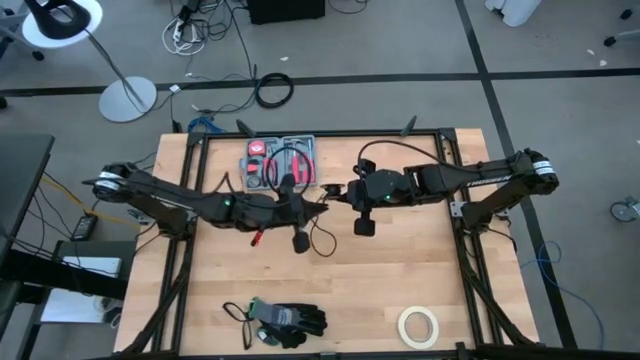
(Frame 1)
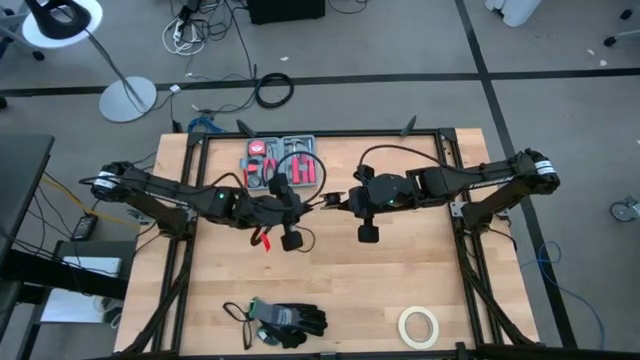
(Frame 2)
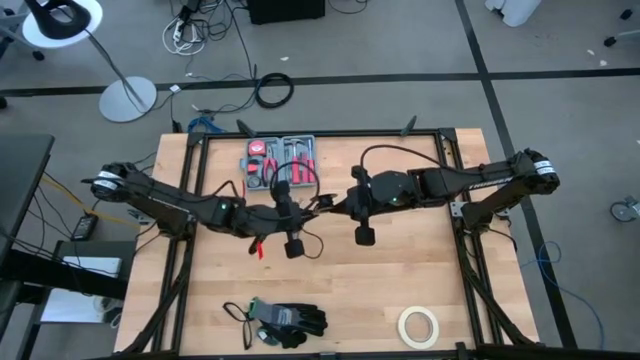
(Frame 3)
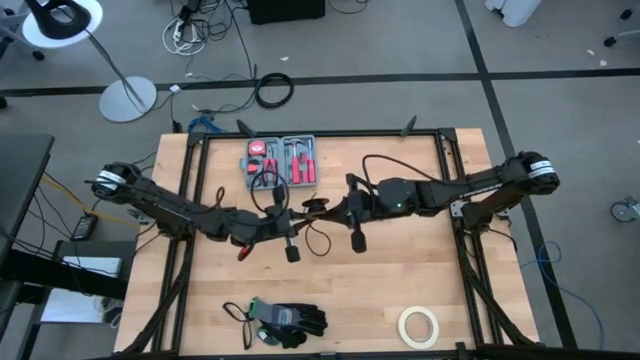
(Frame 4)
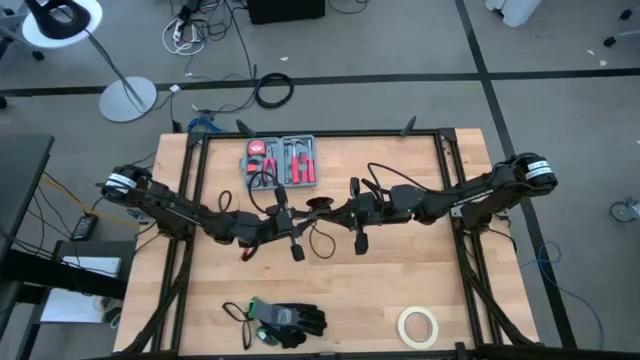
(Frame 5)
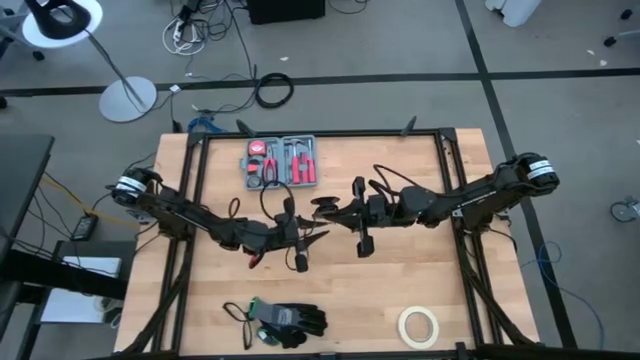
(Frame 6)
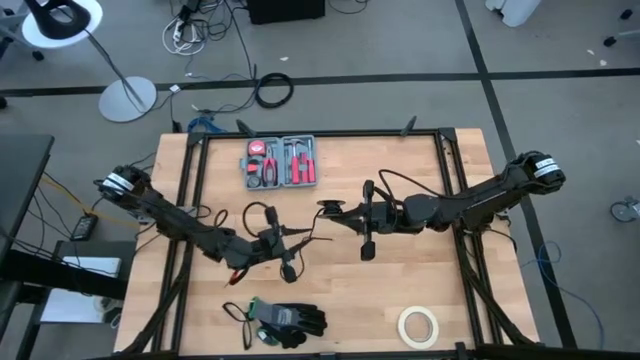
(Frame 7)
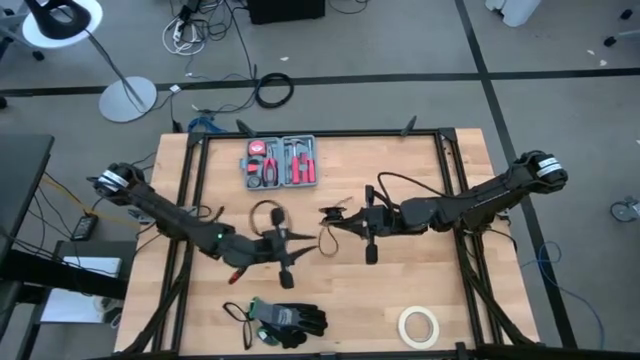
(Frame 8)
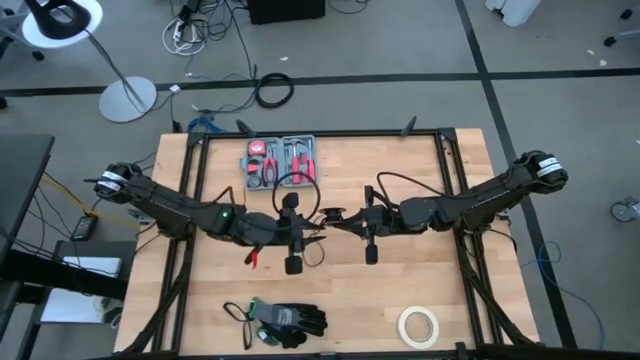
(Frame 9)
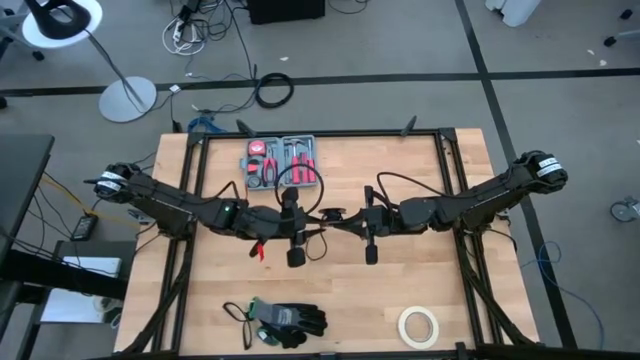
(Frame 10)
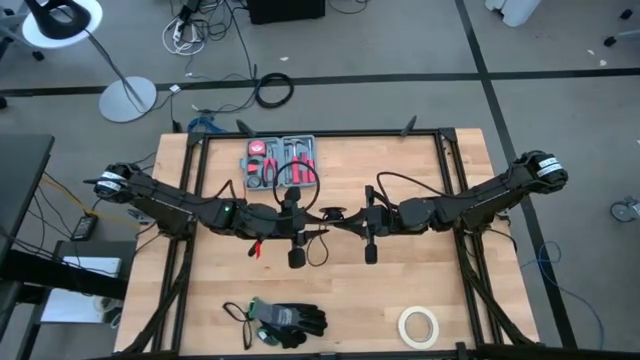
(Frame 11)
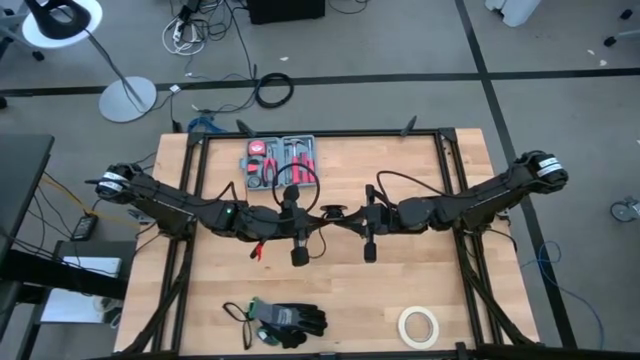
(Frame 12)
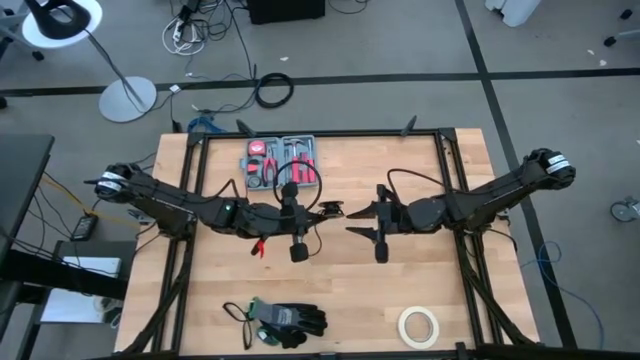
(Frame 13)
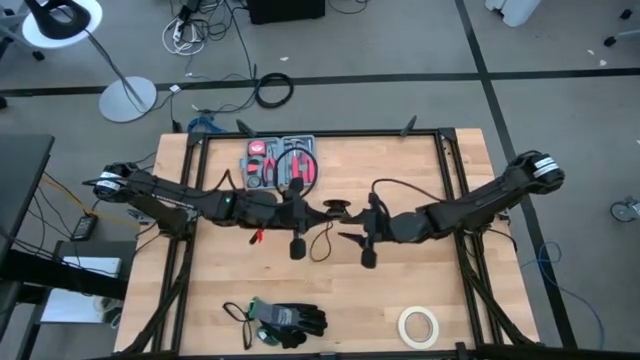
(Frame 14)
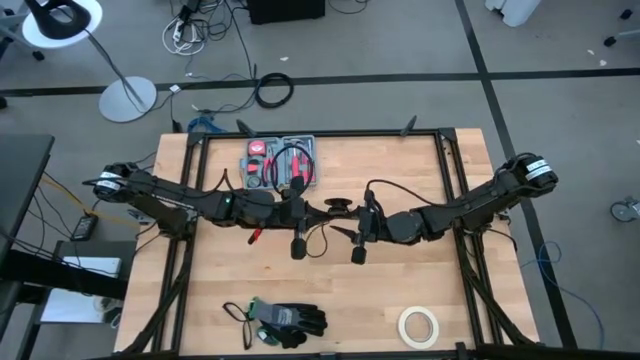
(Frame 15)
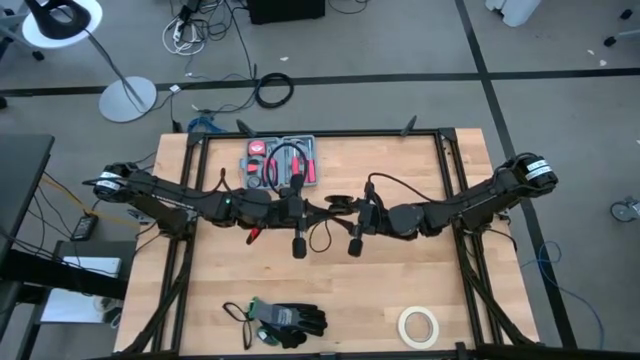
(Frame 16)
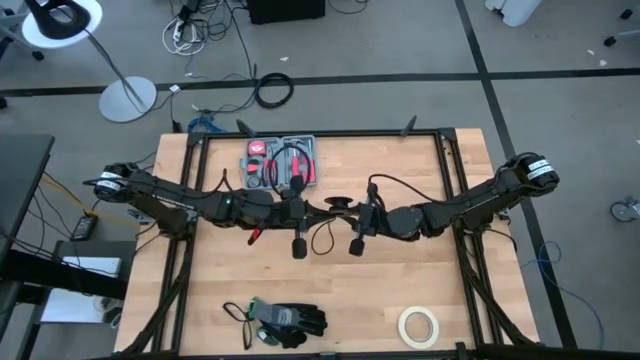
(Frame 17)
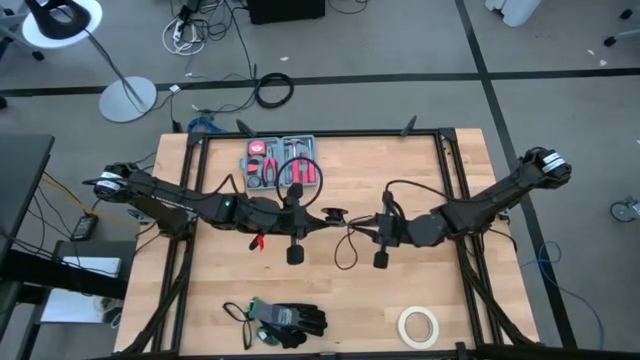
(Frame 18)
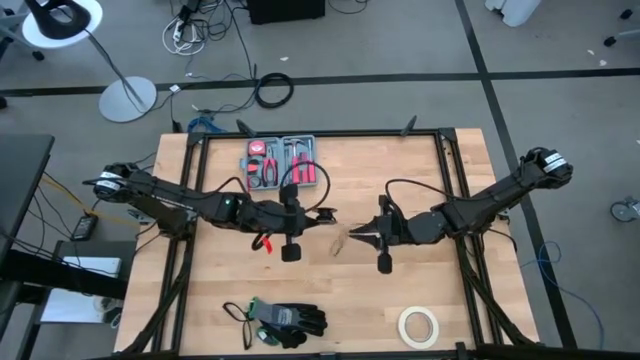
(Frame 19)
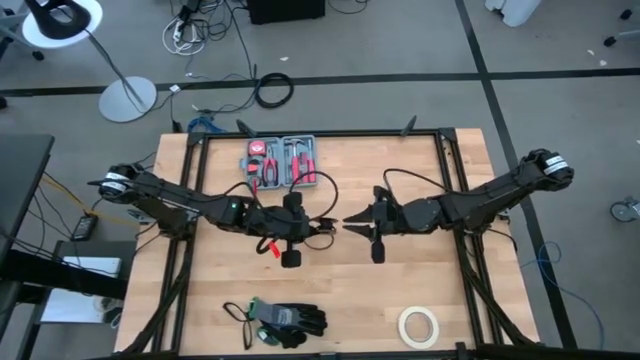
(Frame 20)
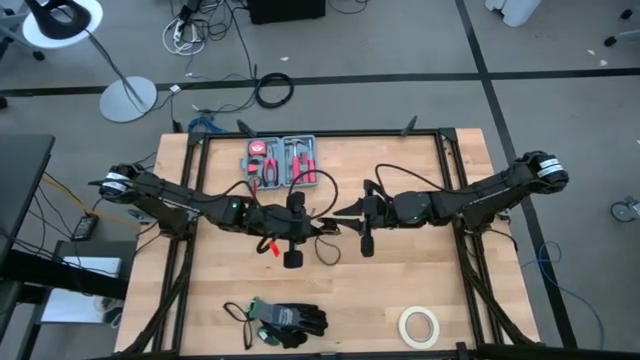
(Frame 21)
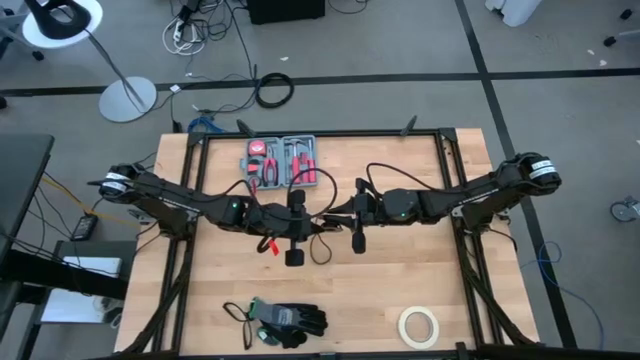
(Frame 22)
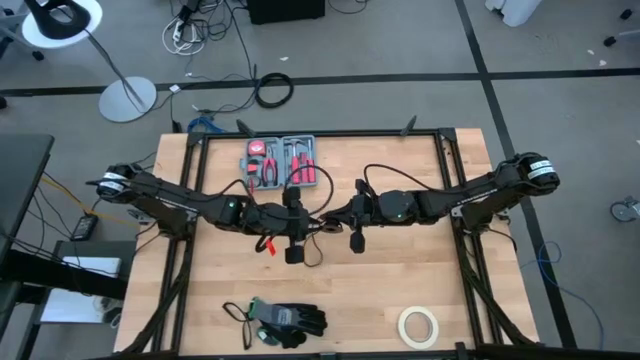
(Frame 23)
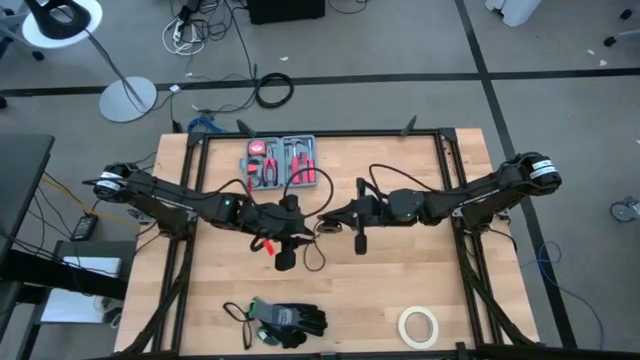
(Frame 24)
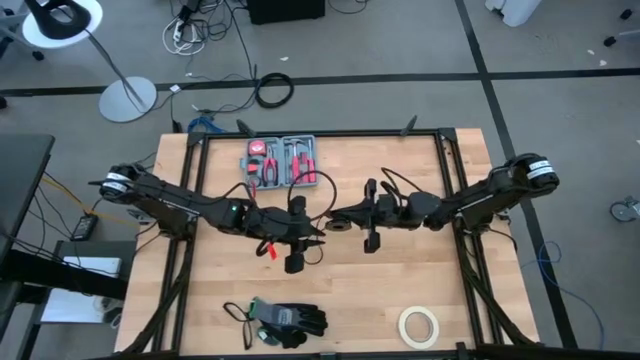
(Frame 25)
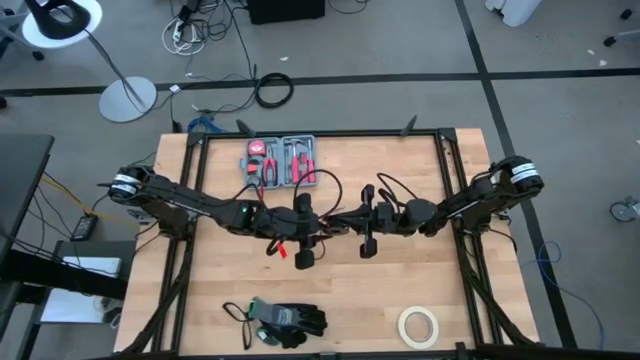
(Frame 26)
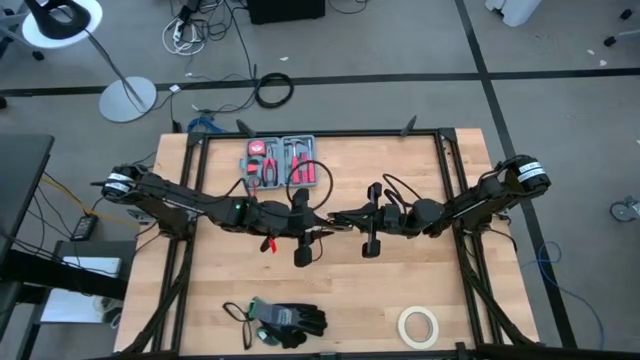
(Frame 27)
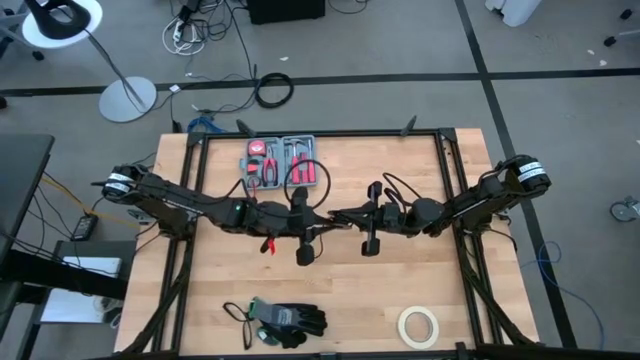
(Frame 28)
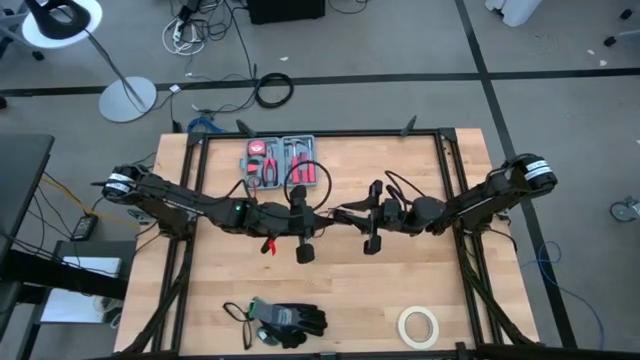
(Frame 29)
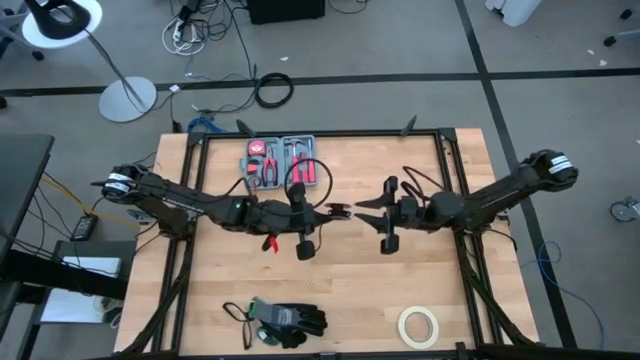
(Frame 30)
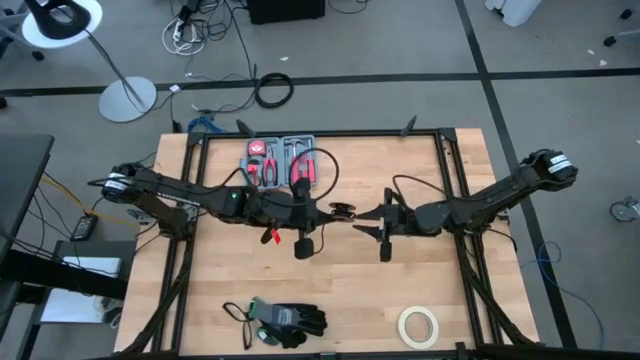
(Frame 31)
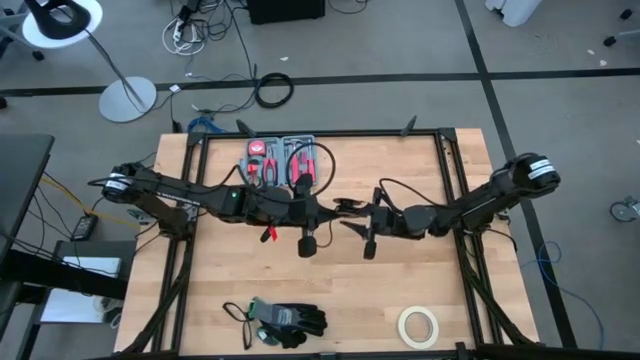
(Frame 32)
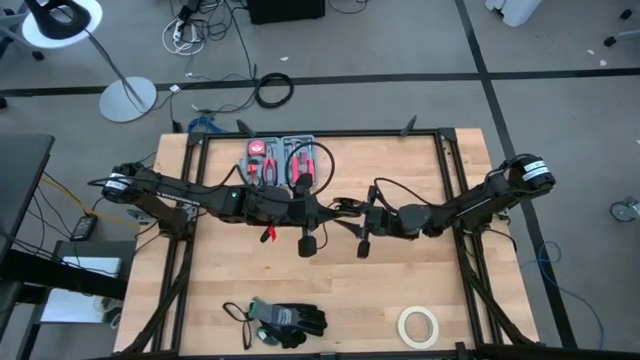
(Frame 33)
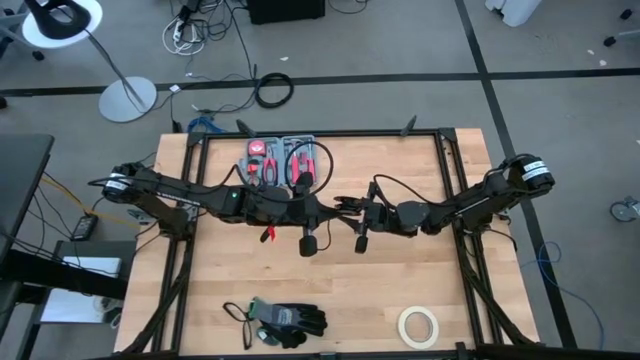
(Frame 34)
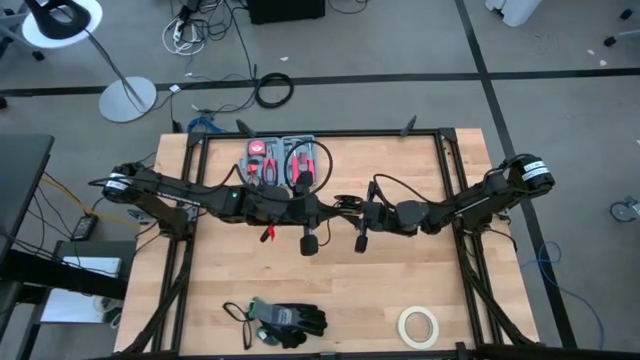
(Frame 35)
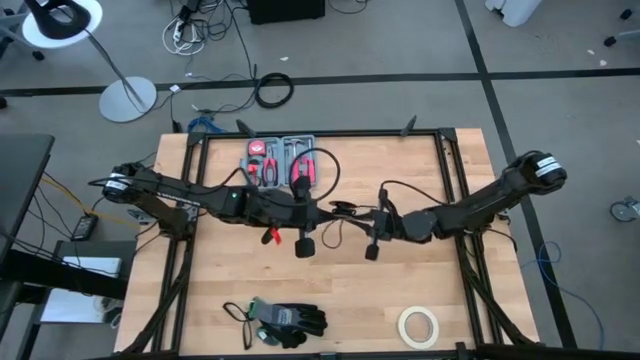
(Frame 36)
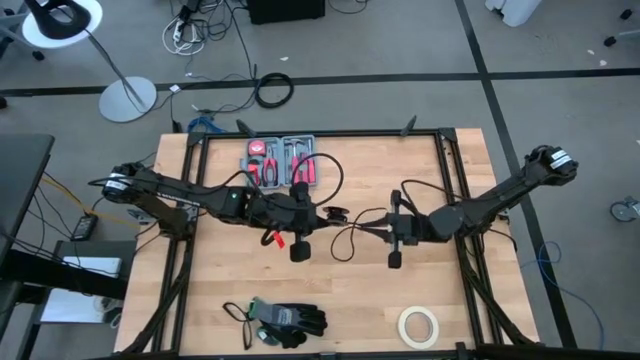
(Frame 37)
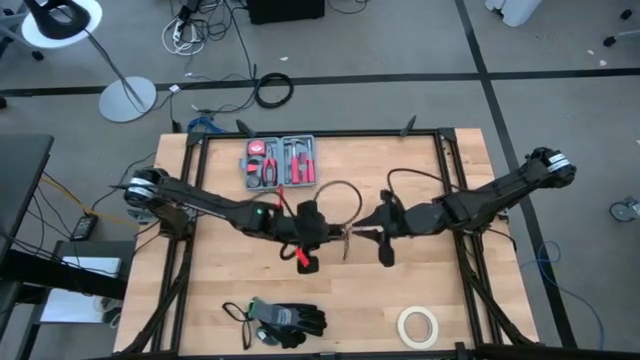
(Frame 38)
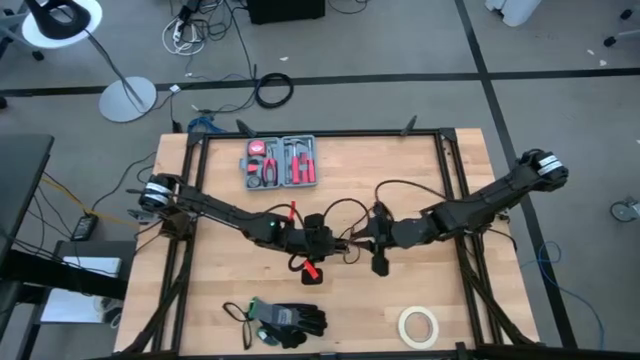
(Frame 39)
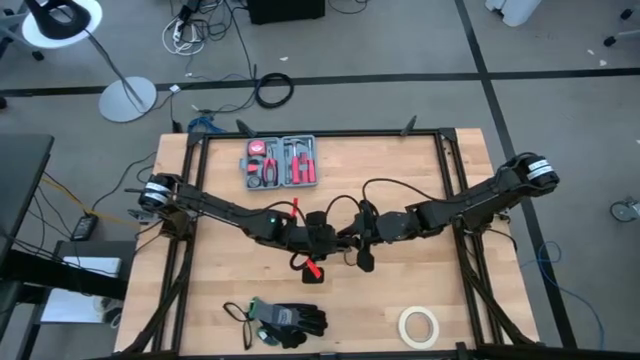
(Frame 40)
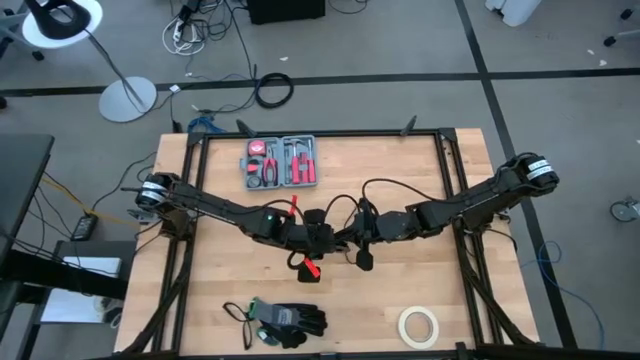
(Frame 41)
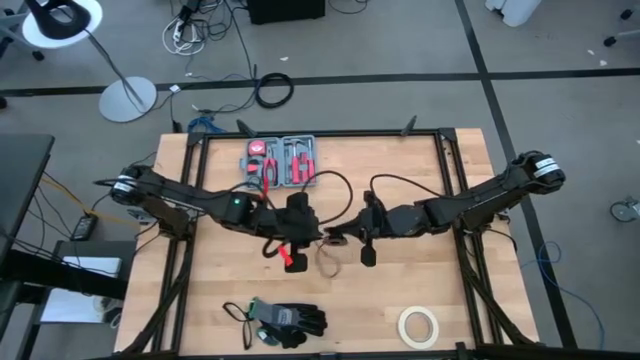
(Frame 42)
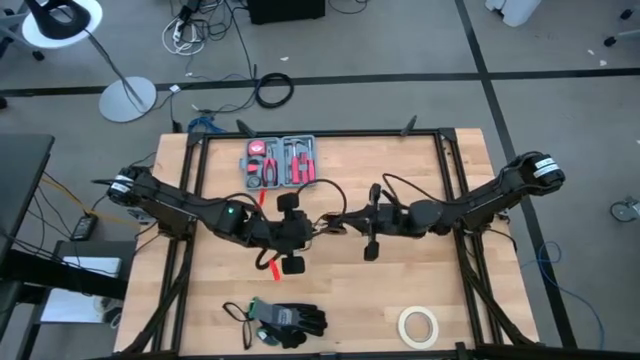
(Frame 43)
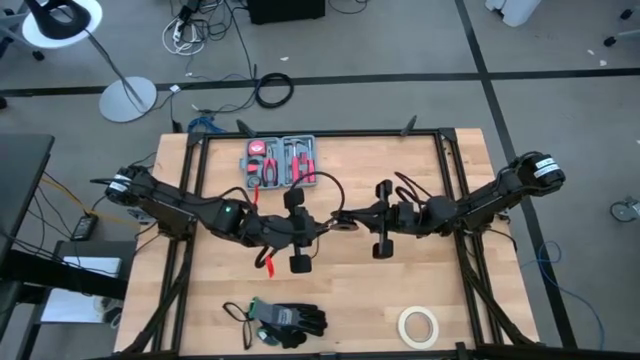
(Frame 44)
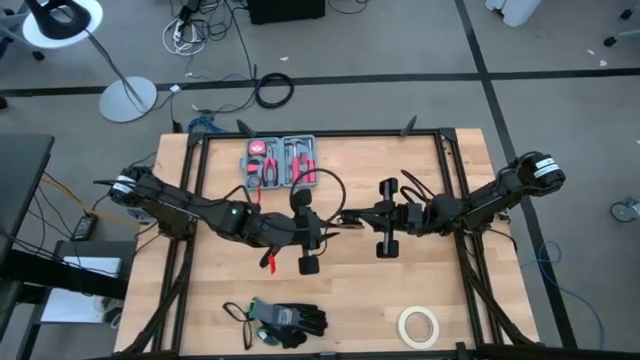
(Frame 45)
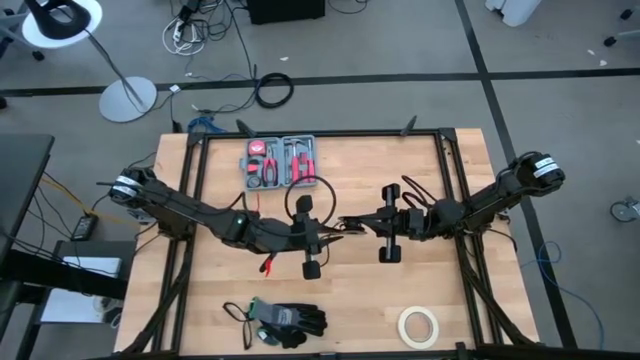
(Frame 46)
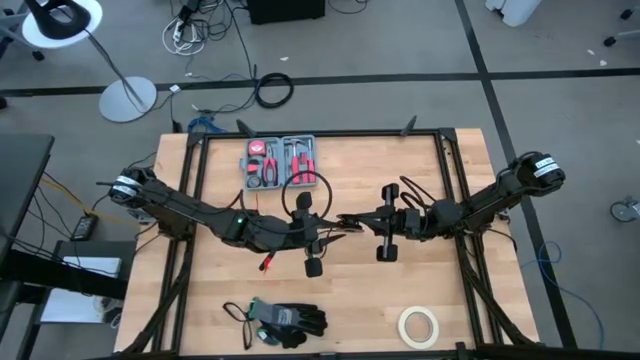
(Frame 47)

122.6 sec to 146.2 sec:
Task: Coil cords
Coil the black wire cable into the black spool
